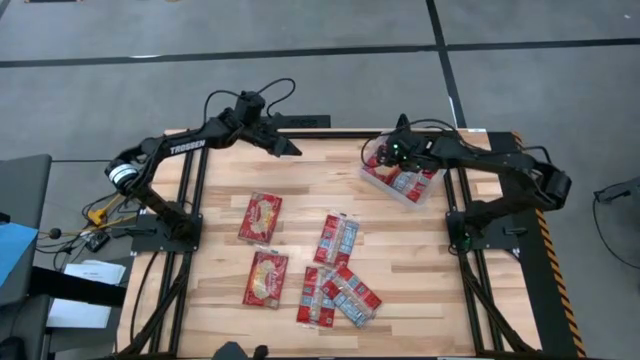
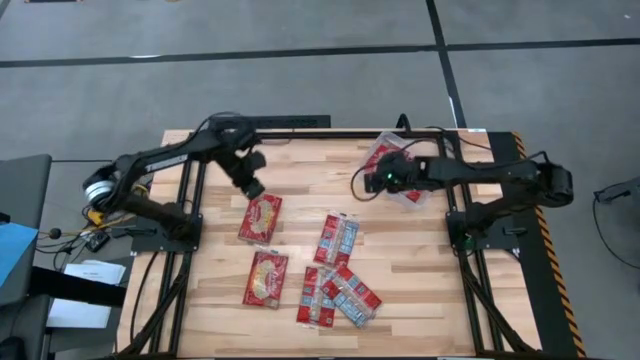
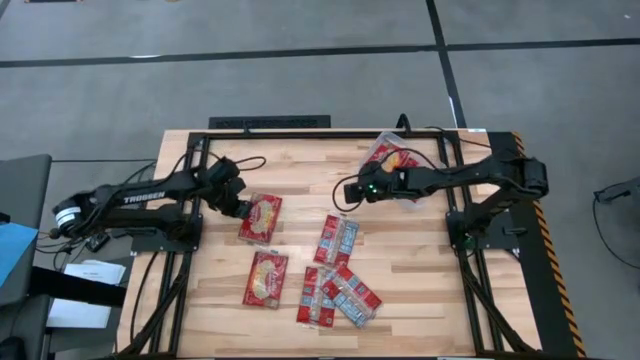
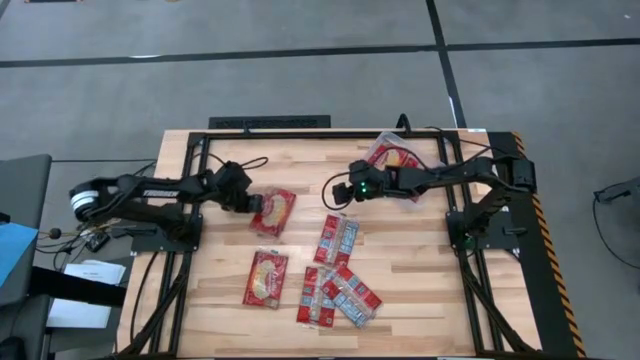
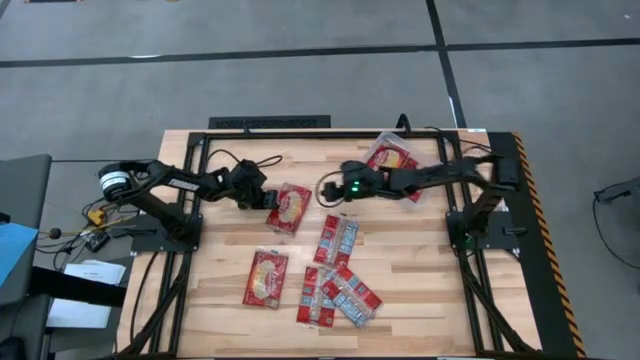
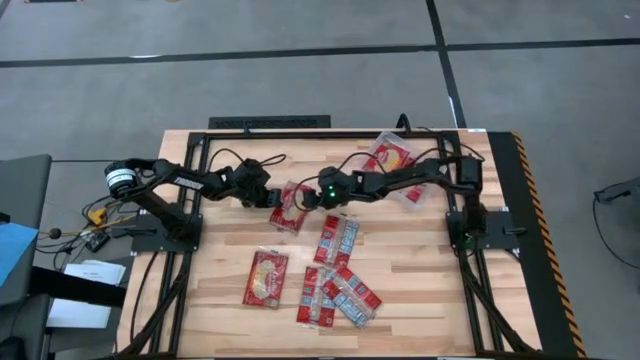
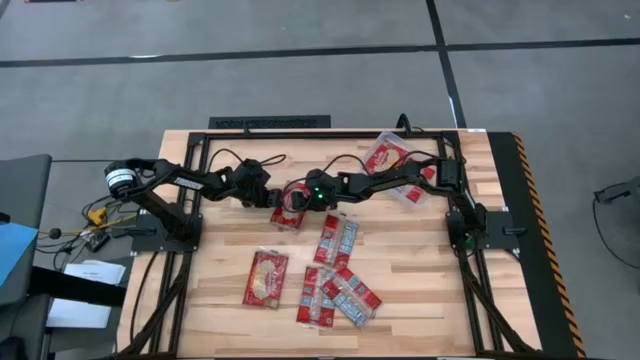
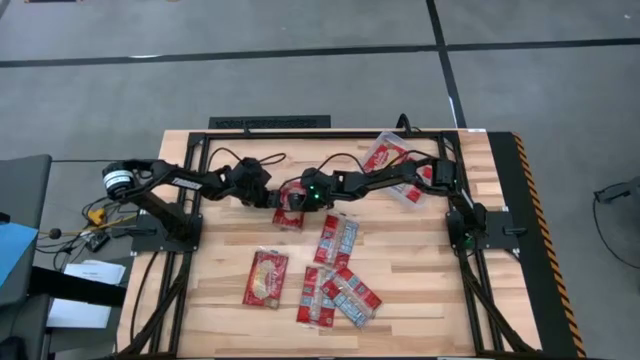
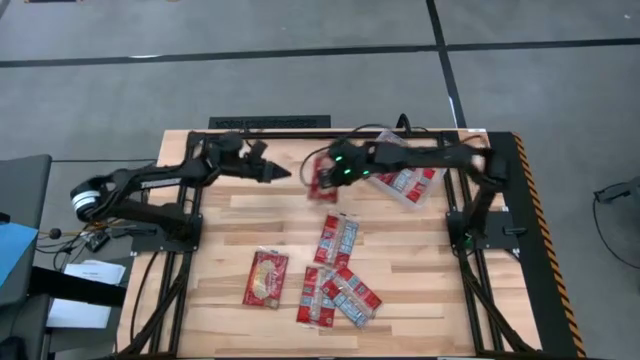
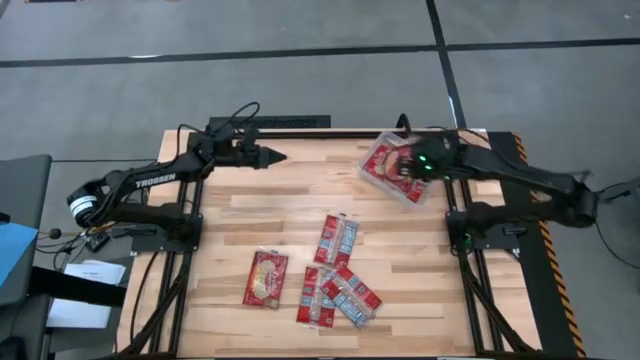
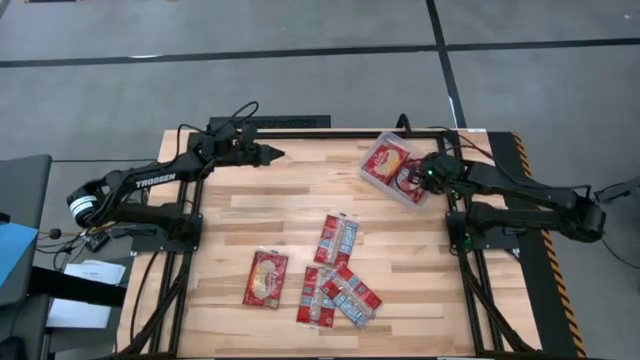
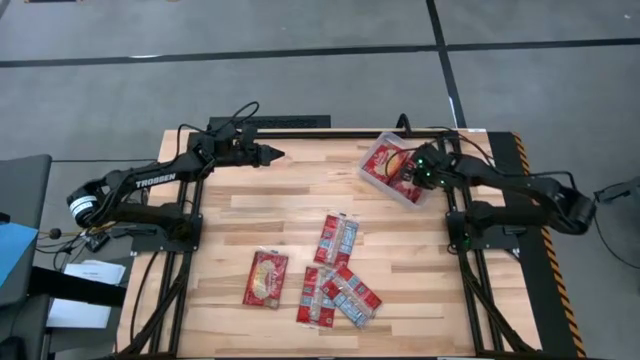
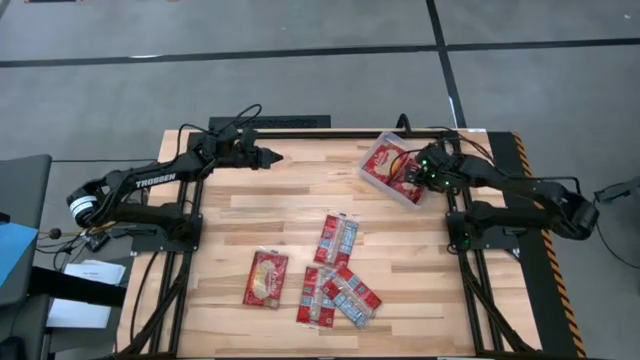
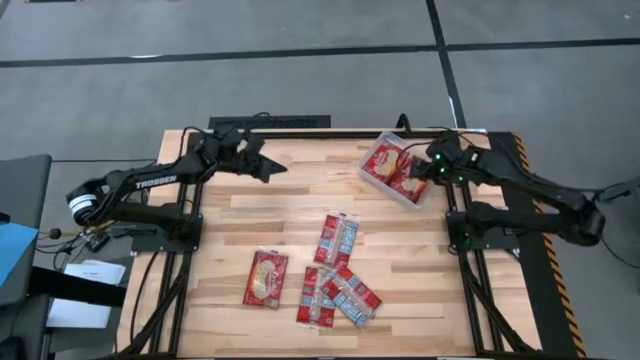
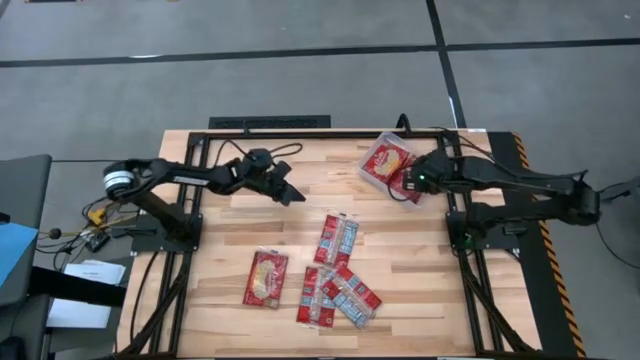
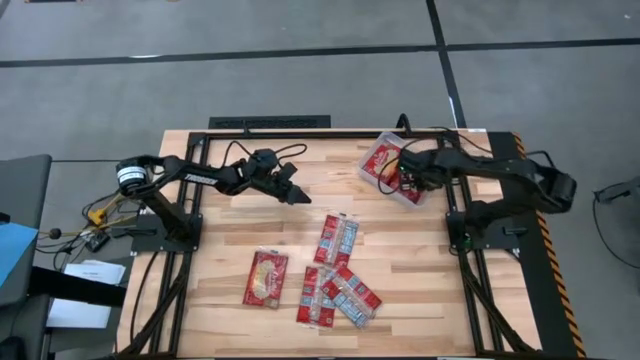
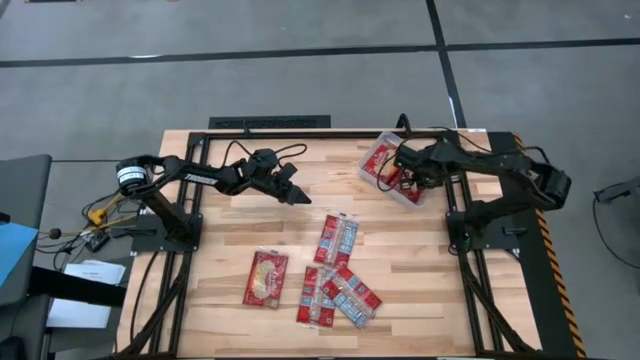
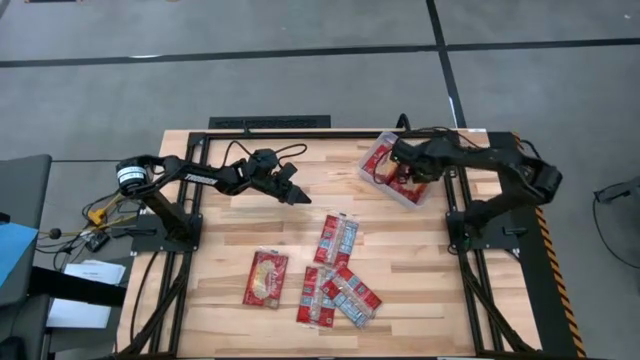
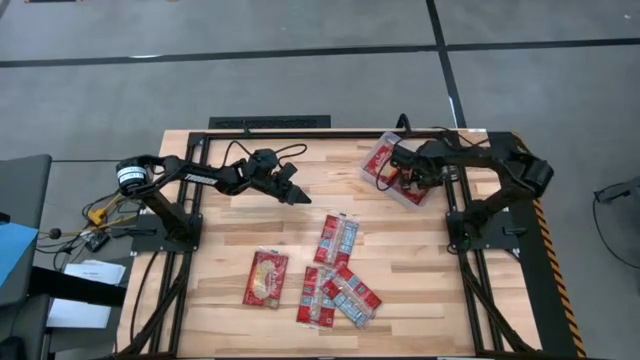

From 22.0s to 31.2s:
Task: Sort popcorn bags into baskets
Put the red popcorn bag into the transparent bin

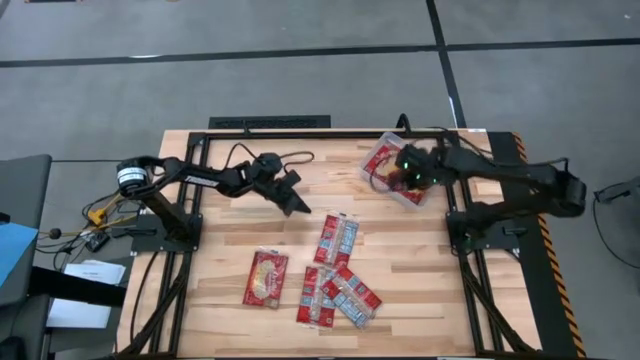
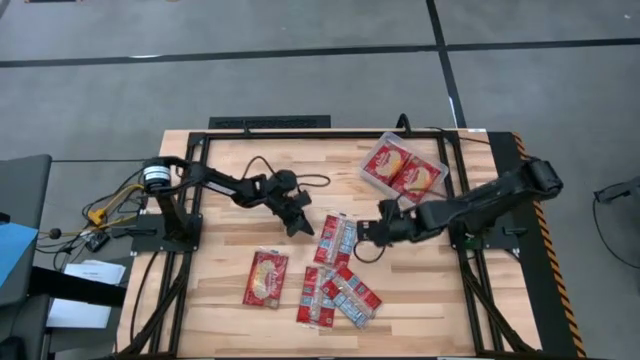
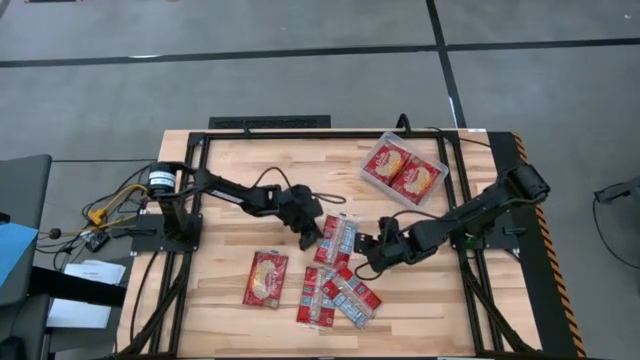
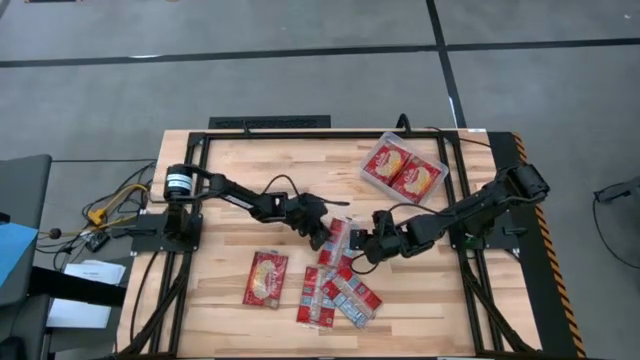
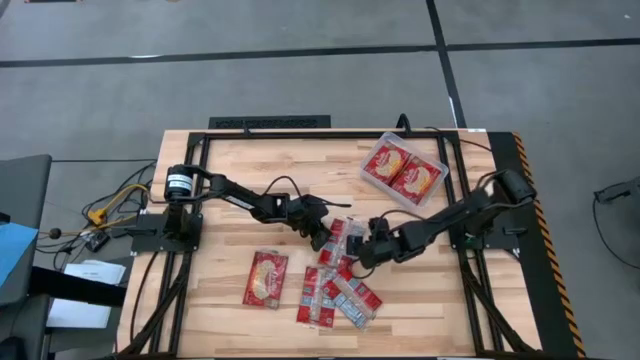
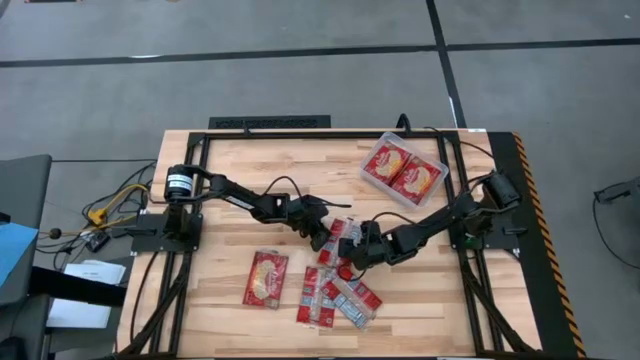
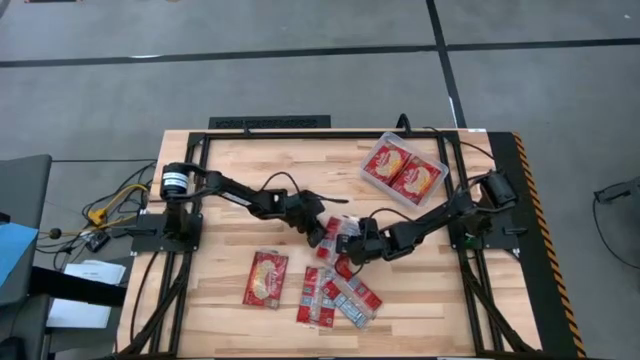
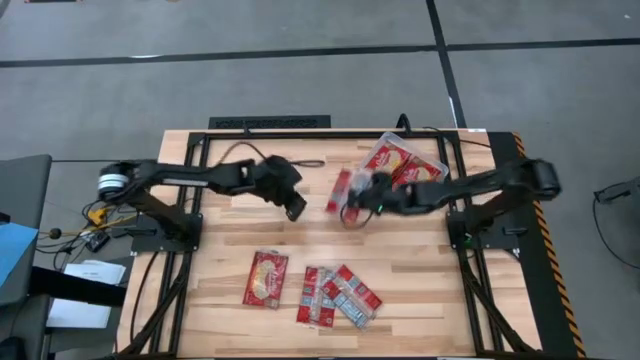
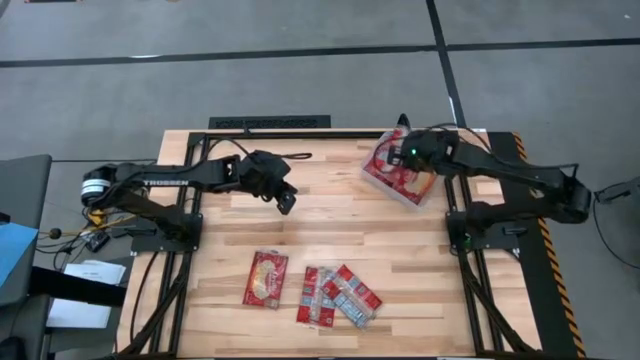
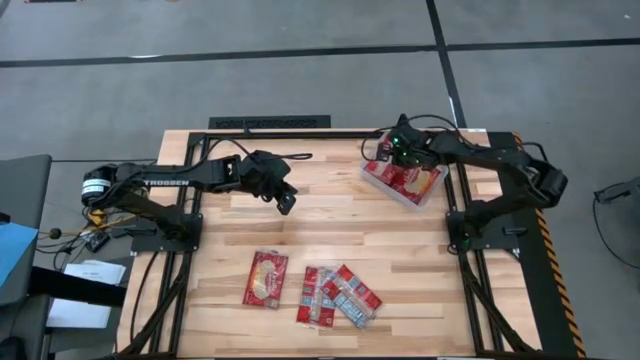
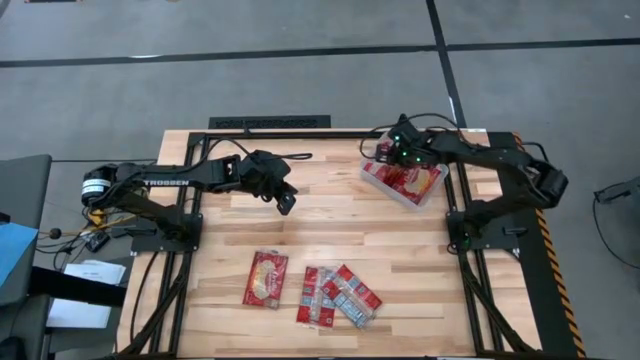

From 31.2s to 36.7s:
Put the red popcorn bag into the transparent bin

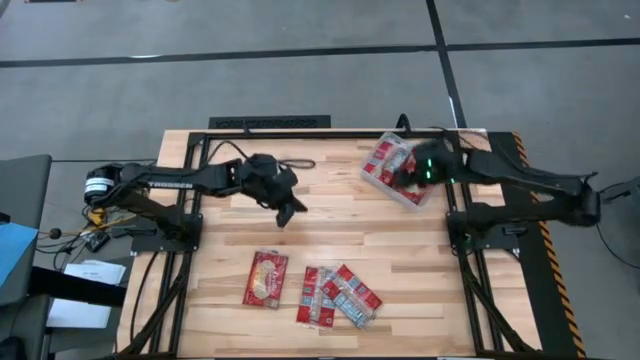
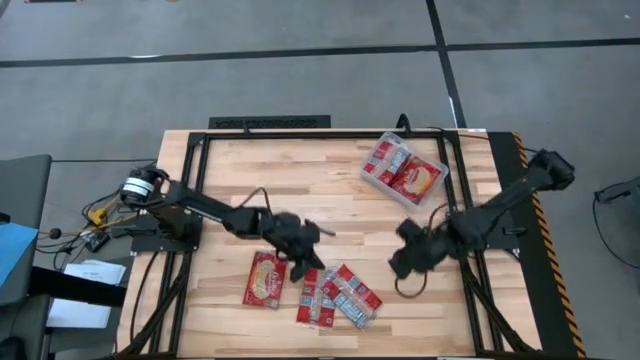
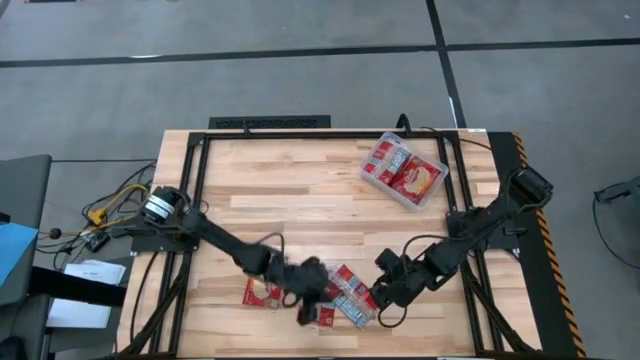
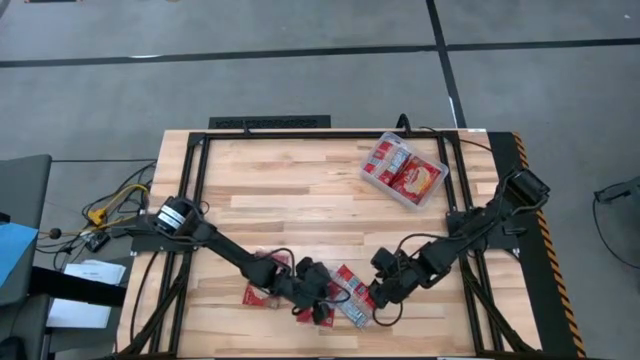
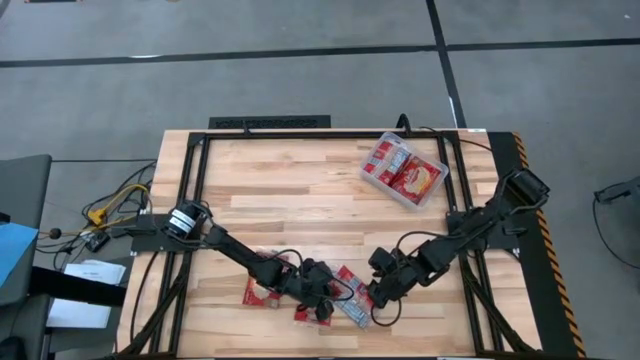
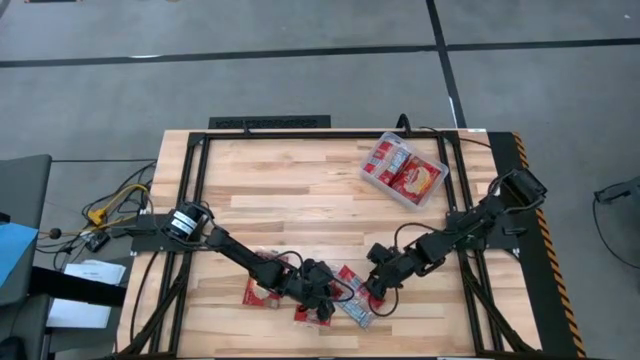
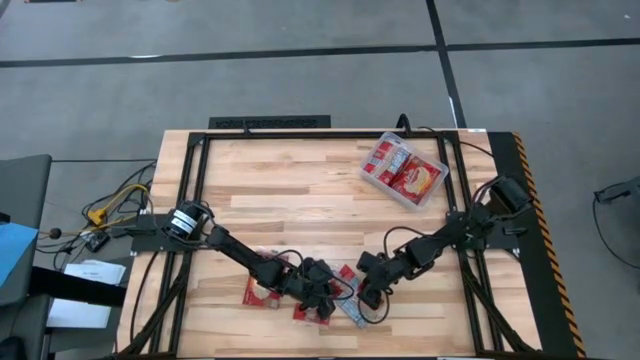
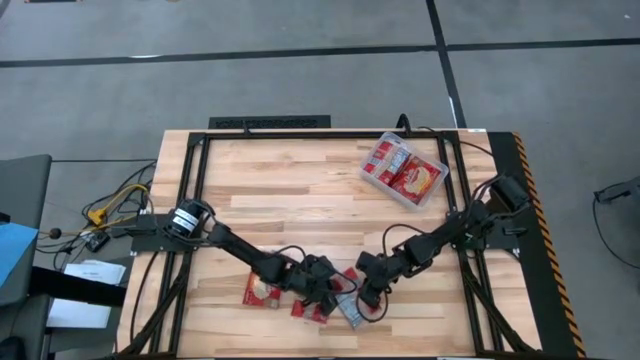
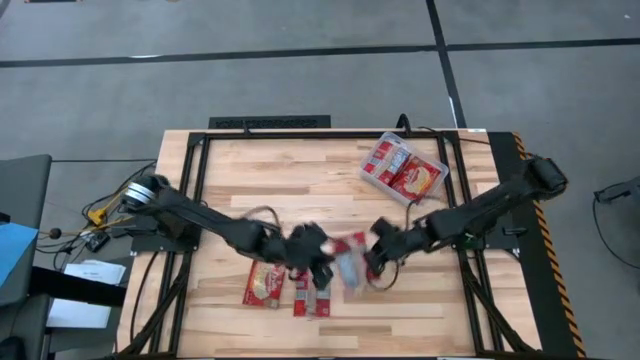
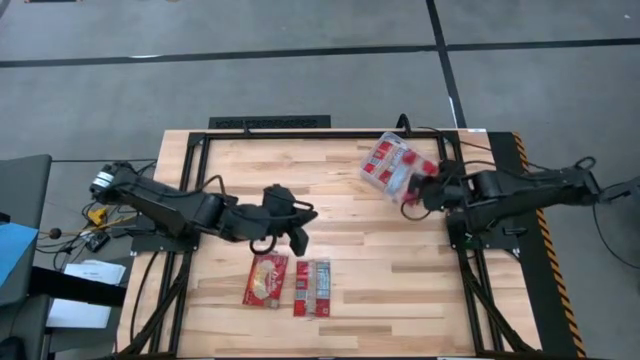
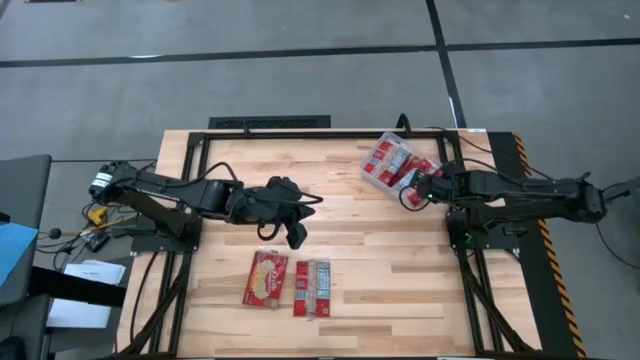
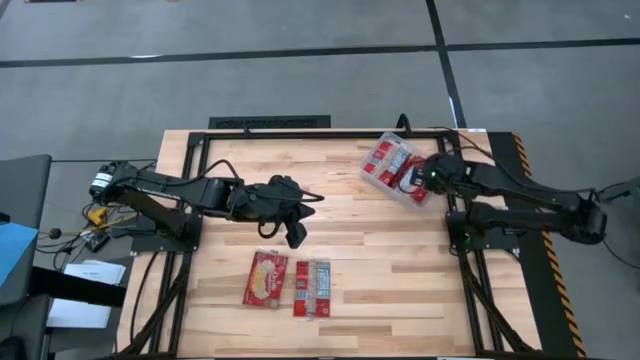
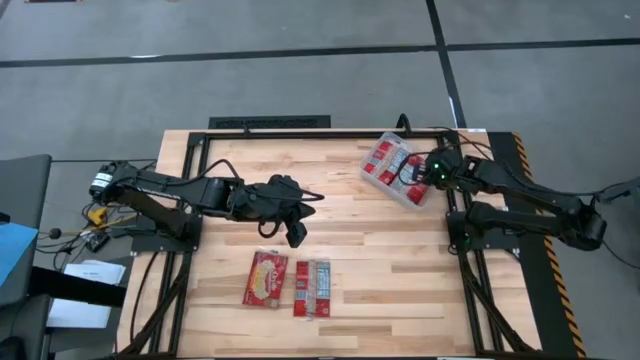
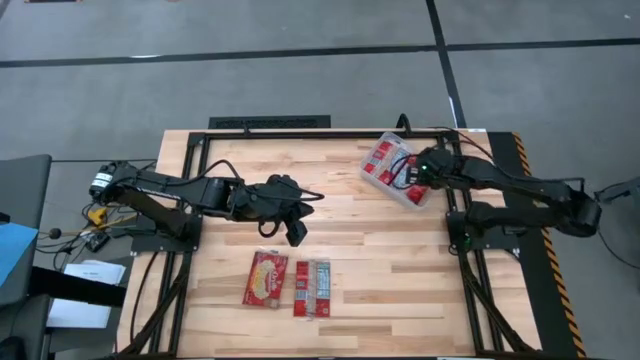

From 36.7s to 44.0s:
Put the red popcorn bag into the transparent bin
